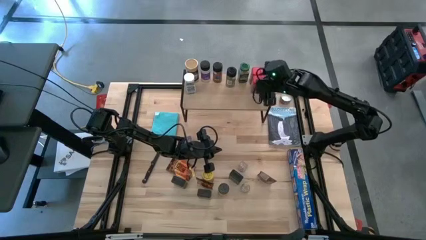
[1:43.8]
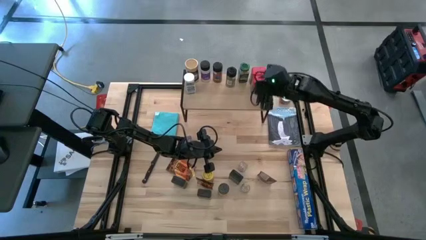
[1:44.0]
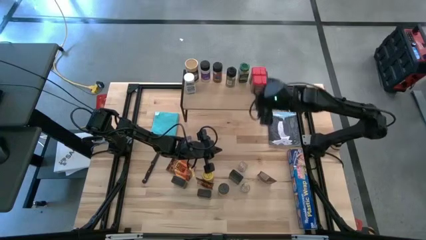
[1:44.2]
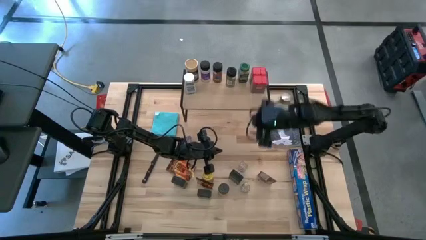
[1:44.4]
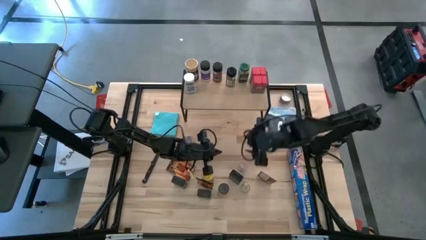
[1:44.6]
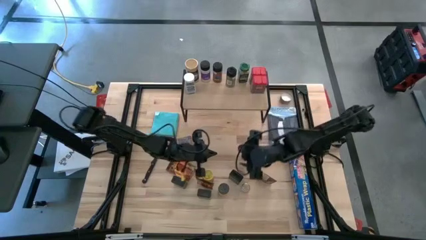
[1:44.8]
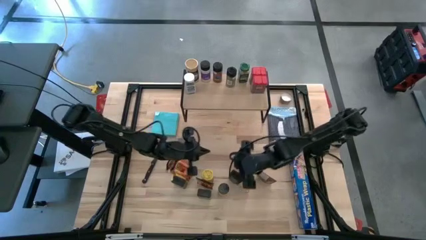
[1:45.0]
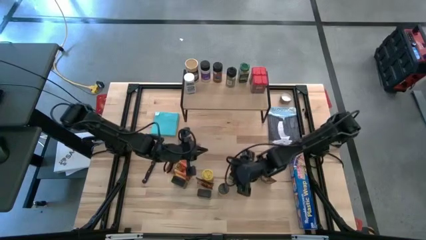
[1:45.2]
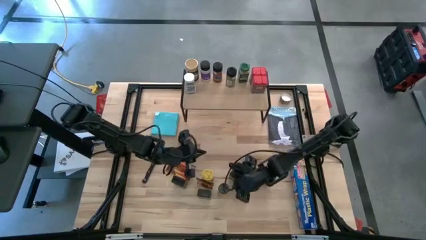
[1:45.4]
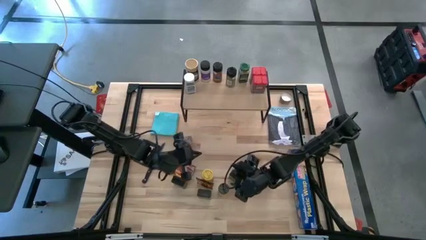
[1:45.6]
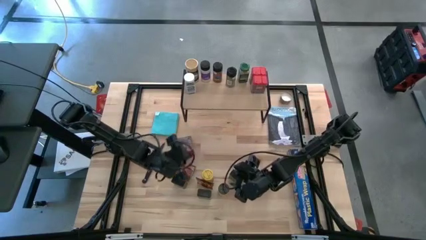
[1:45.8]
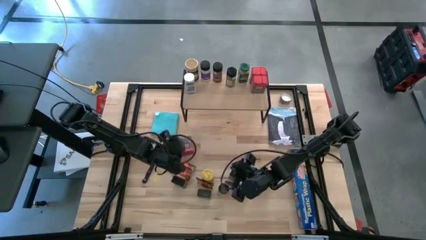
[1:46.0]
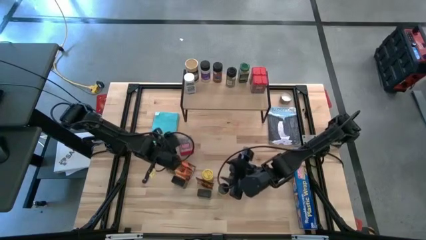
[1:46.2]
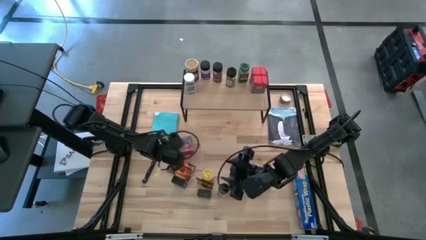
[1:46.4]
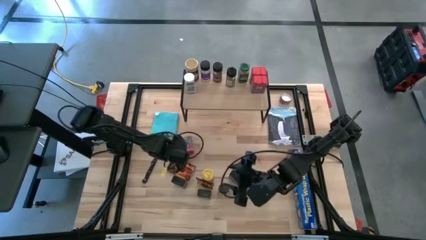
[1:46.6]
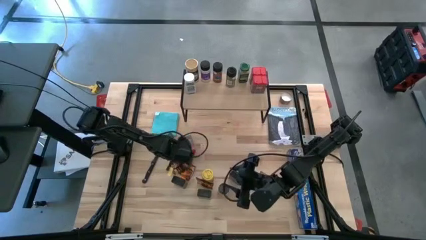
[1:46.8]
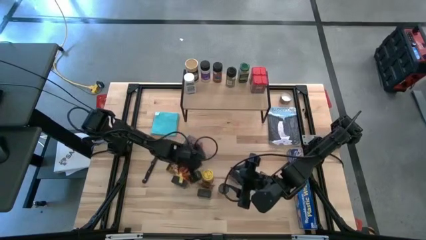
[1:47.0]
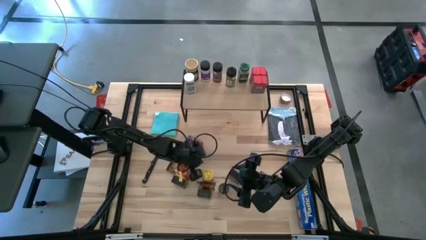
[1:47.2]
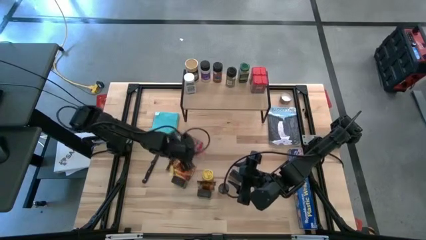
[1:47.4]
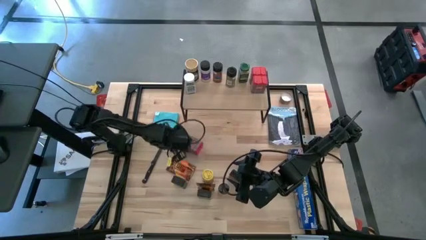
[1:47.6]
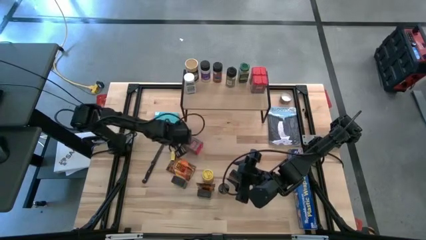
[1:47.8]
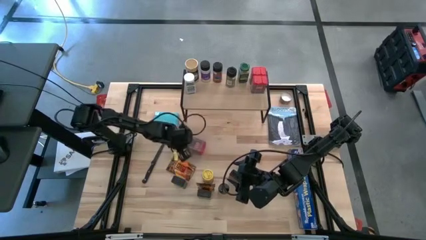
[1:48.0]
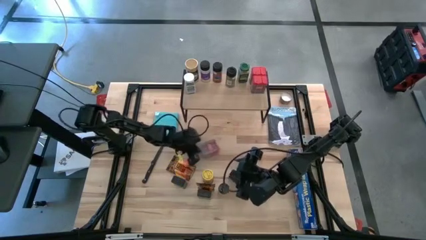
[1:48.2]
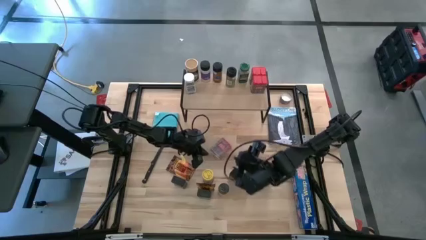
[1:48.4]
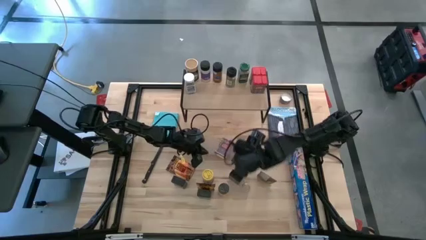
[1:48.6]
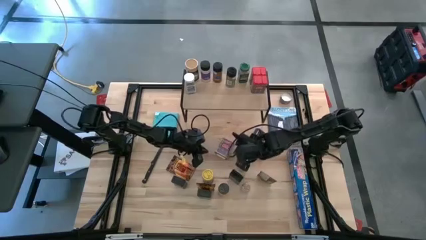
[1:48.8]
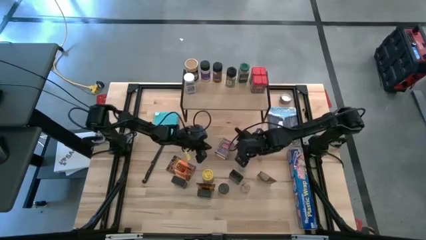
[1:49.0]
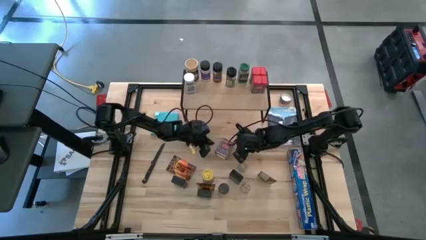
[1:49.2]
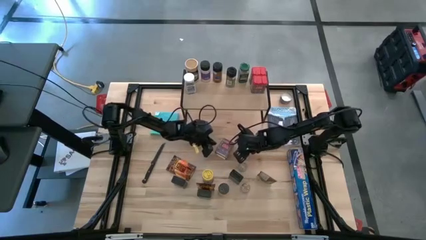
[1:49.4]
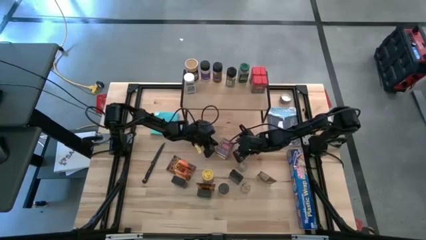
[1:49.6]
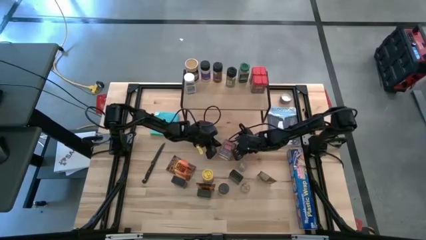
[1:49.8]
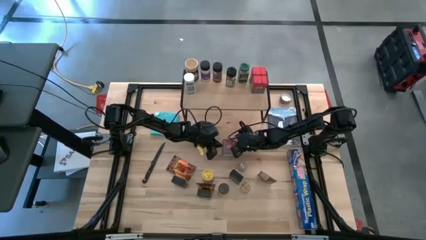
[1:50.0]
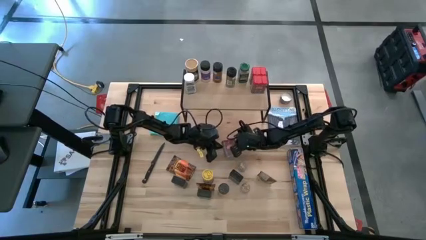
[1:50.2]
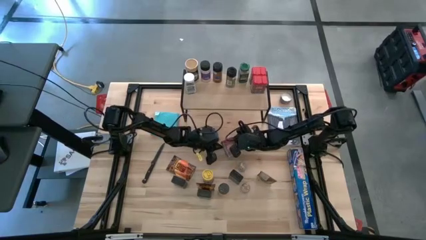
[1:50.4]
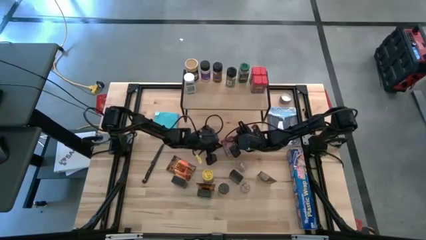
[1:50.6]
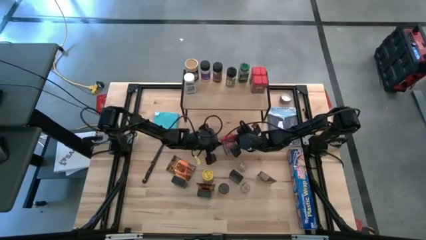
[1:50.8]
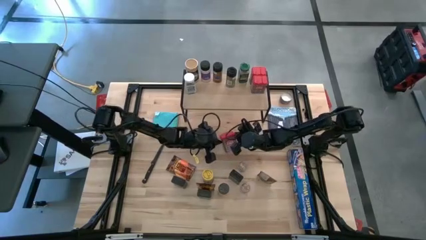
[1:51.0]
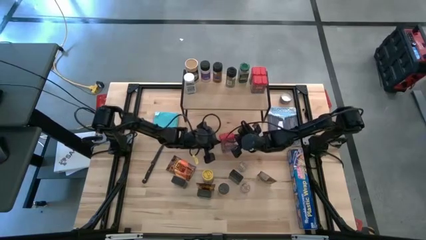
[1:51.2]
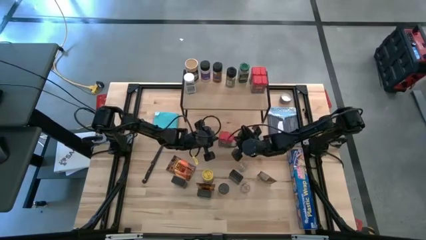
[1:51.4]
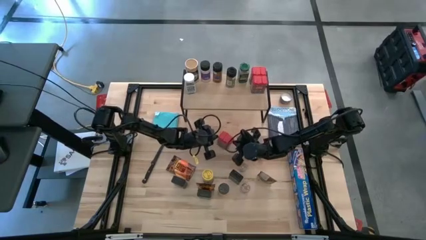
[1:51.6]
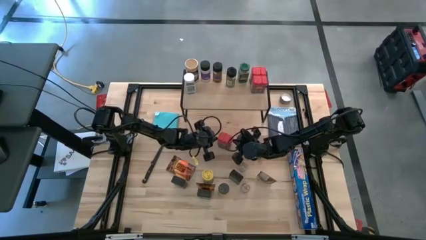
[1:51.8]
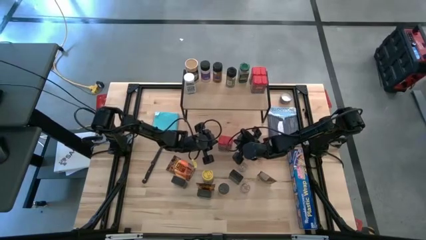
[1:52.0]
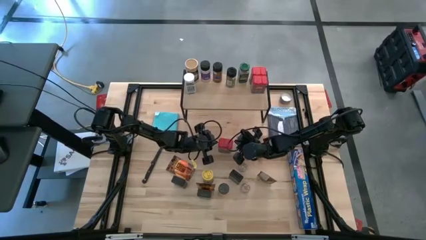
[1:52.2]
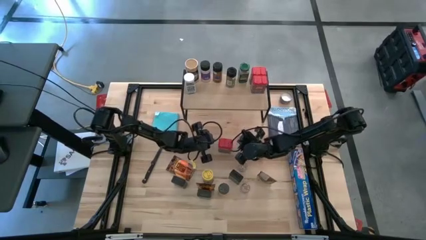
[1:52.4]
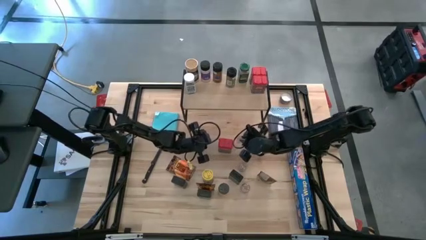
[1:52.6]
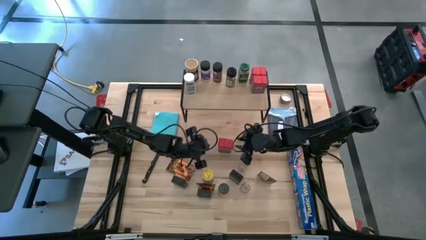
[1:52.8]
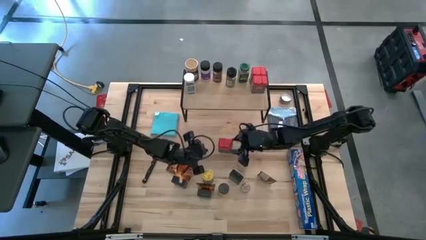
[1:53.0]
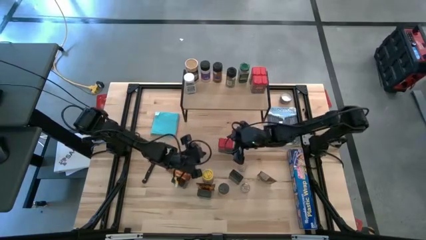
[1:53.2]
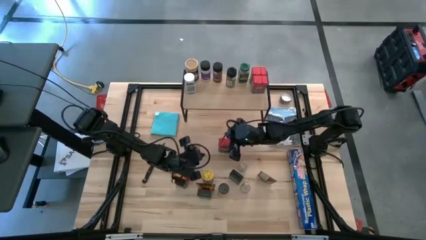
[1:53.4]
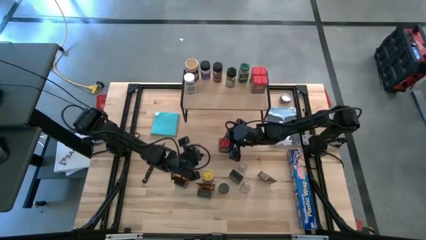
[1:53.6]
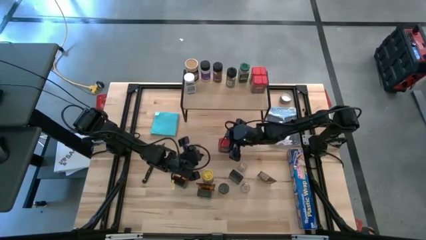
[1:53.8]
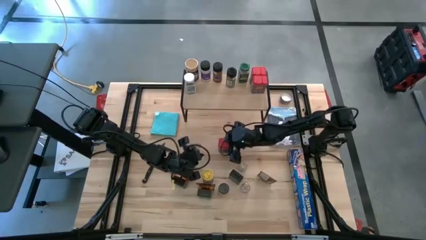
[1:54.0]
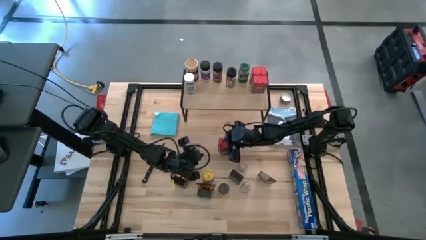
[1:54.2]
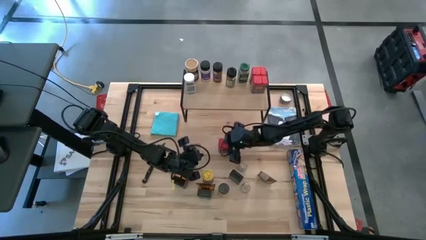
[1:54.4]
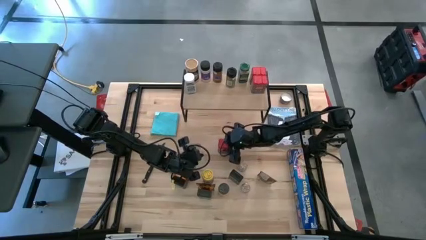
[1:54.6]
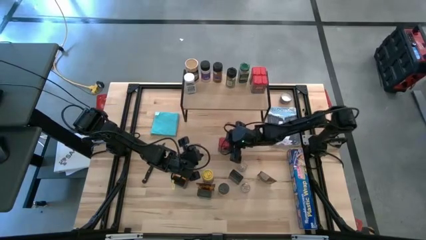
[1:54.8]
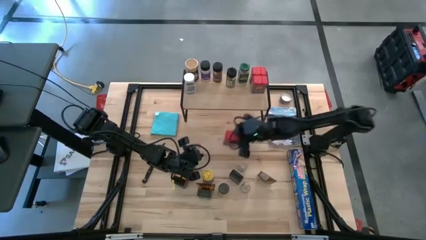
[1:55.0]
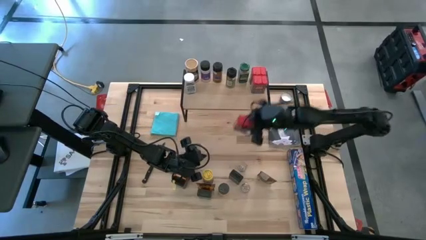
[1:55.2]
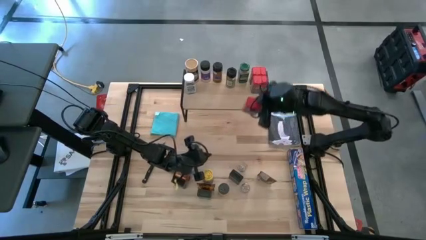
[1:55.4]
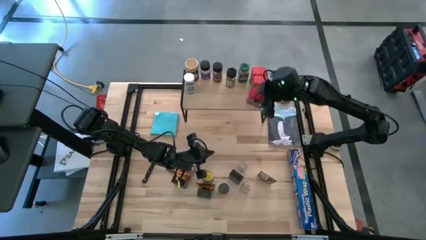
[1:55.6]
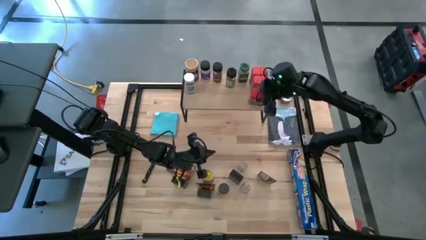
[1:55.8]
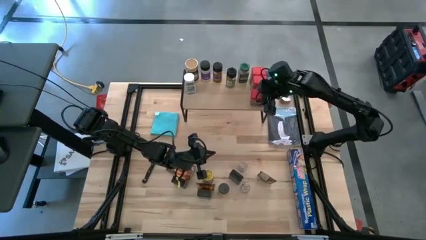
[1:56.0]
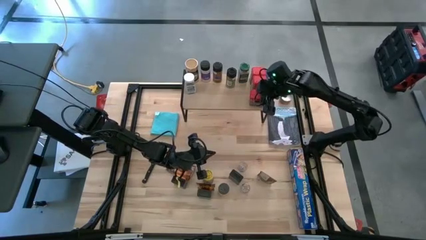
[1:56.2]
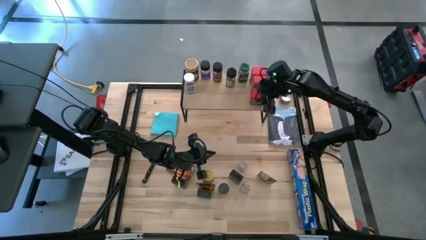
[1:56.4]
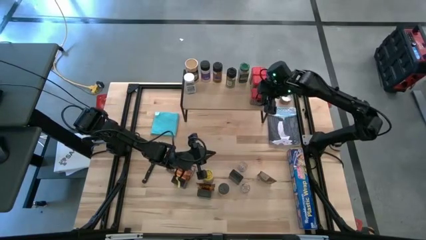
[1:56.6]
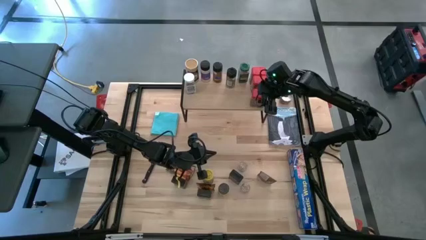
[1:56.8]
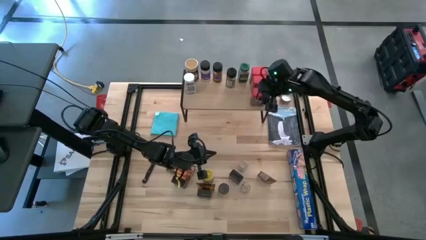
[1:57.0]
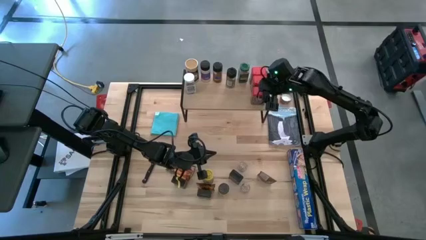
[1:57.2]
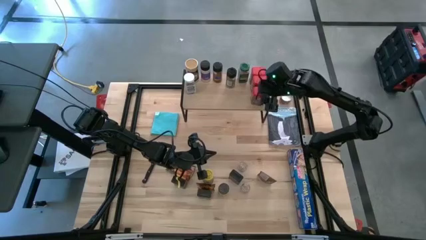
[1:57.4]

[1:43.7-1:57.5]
Task: Shelf spices
Put the red seasoning can on the shelf aligned with the other red seasoning cans

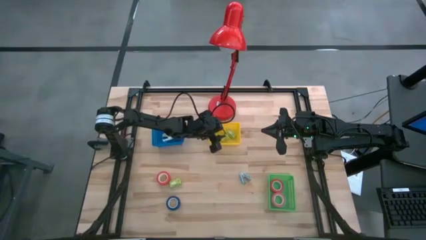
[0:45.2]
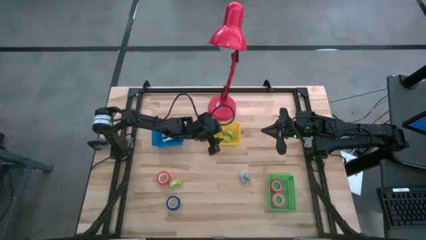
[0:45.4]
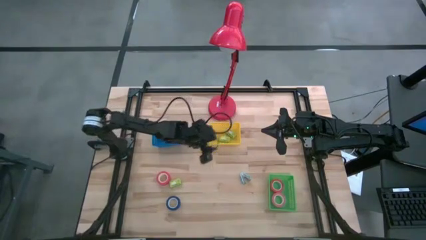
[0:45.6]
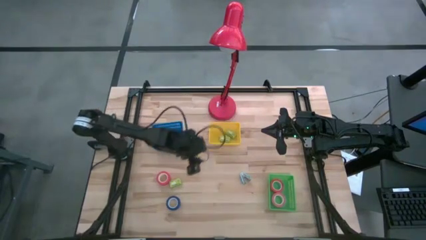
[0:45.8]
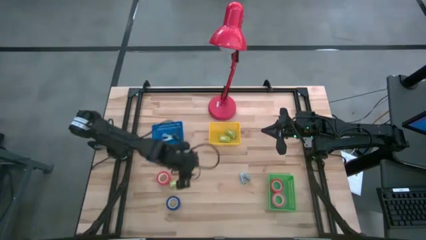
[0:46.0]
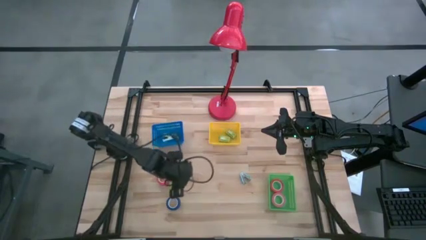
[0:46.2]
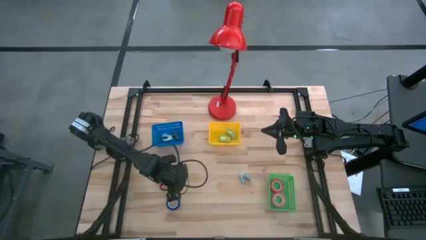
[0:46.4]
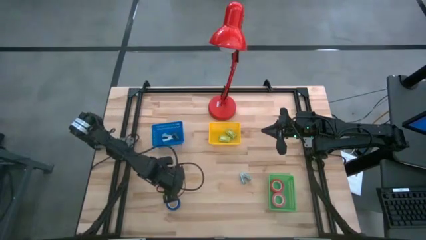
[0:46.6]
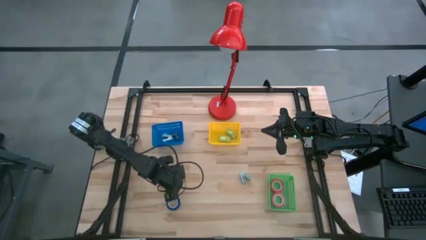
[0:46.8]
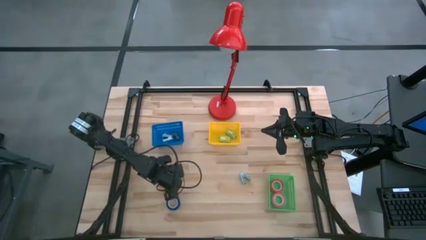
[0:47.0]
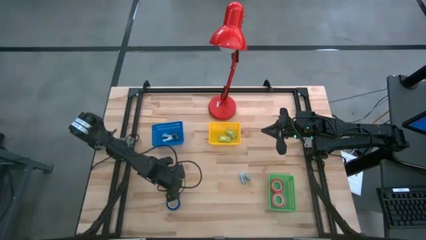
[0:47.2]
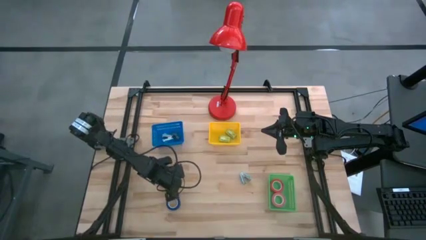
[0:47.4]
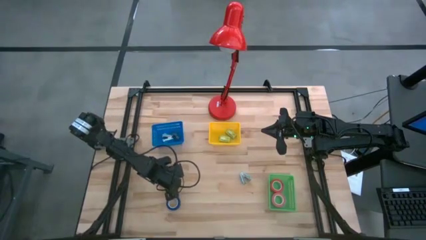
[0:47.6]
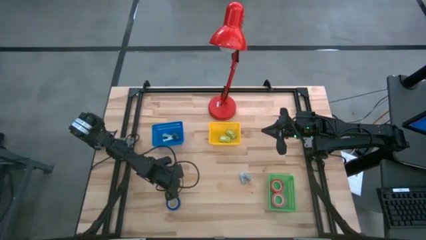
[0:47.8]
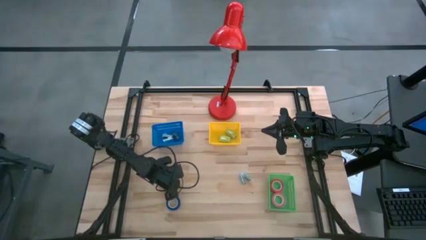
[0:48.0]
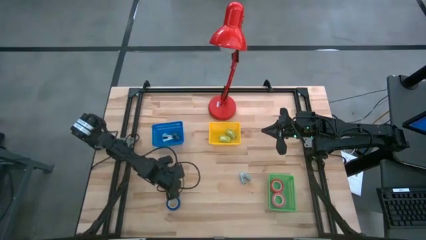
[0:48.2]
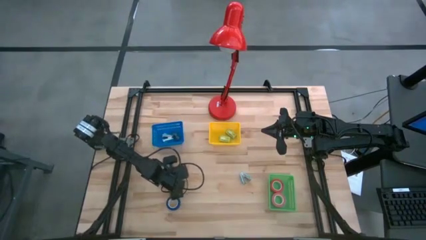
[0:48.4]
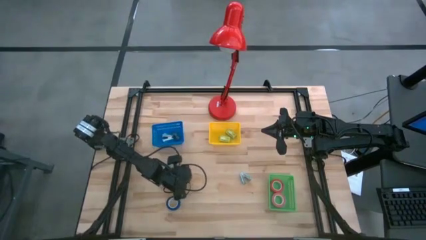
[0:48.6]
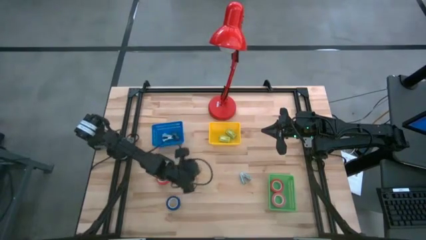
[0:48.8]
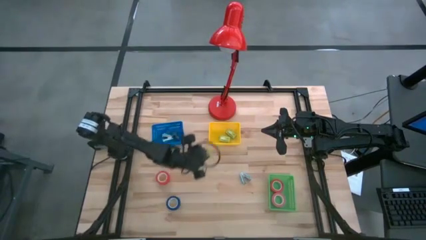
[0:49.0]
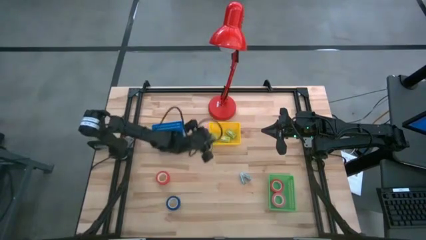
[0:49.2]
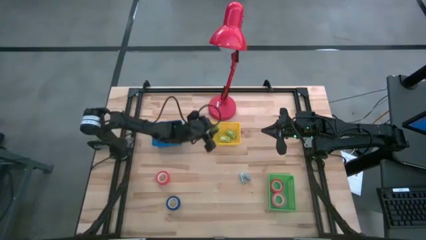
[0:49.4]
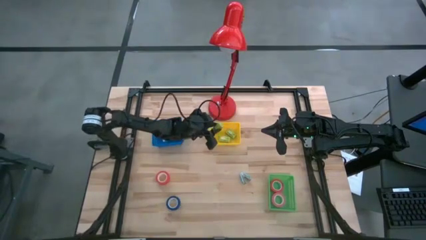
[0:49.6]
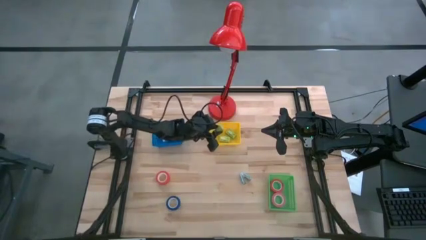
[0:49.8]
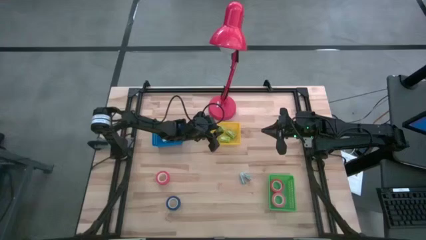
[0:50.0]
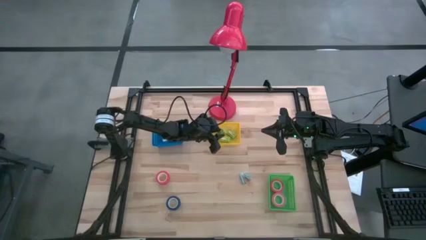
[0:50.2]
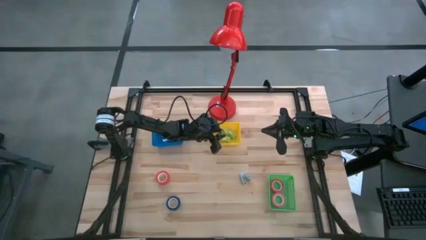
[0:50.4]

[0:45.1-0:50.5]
Task: Pick and place Stapler, Stapler remover, tape
Put the green stapler pin box into the yellow bin
